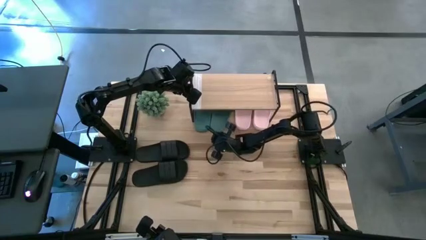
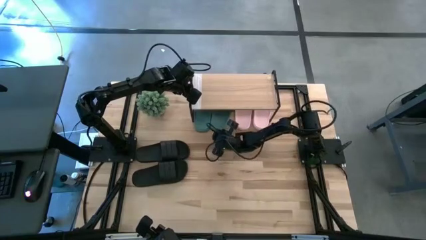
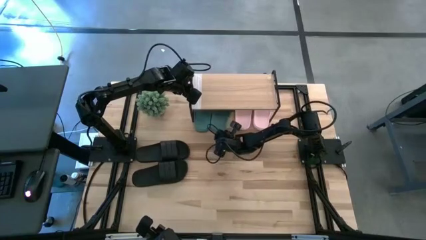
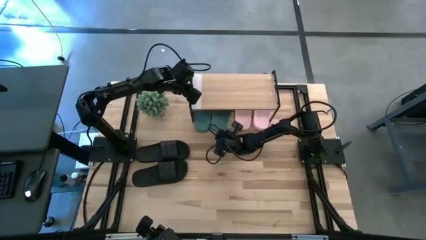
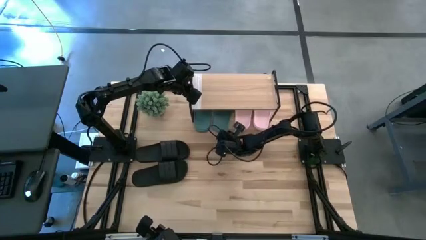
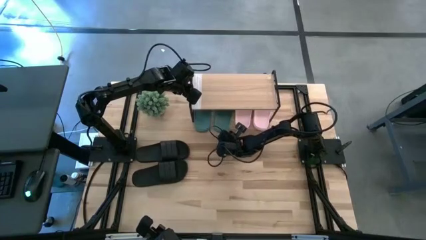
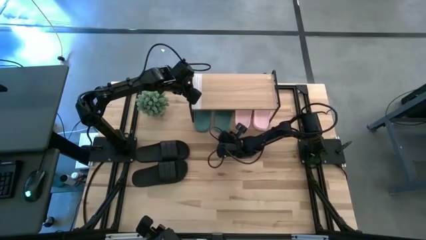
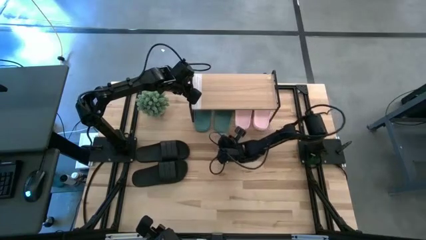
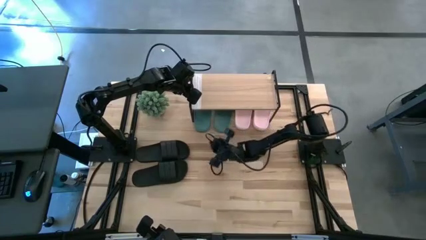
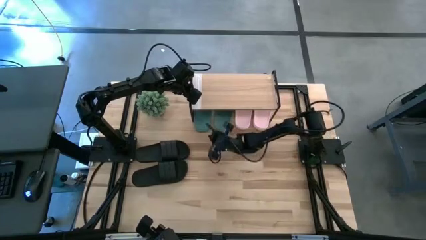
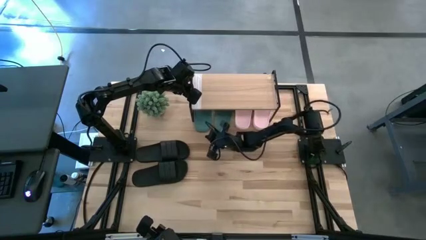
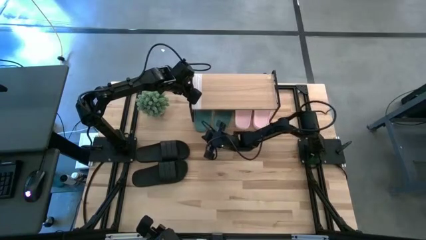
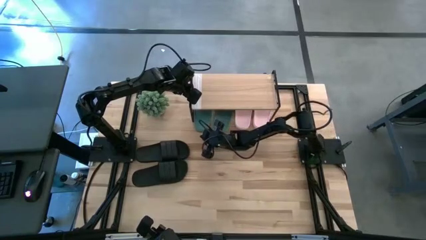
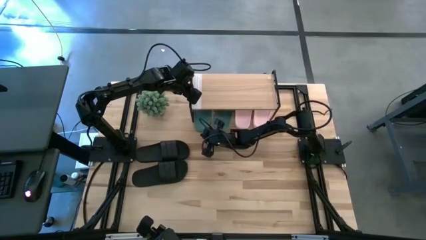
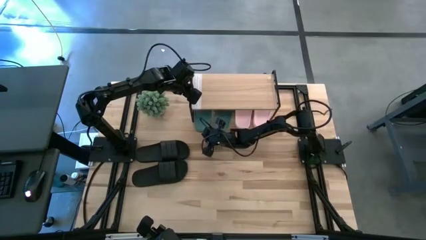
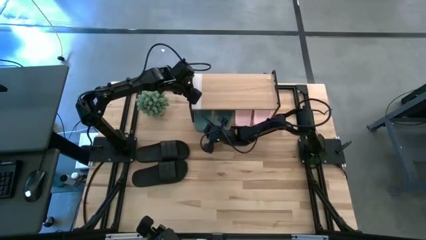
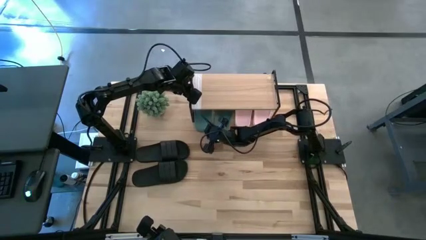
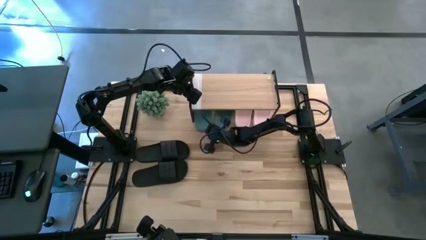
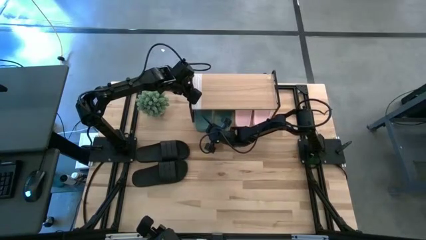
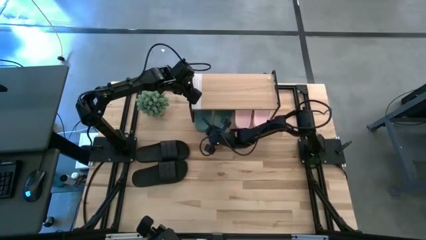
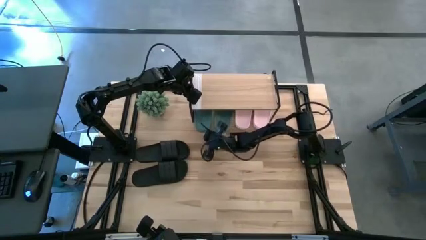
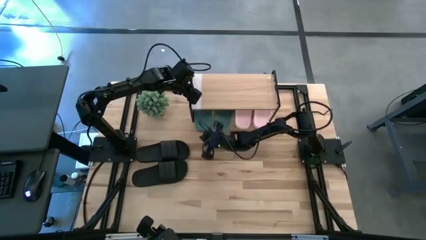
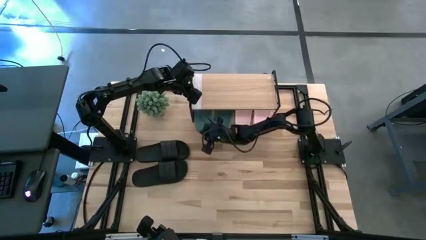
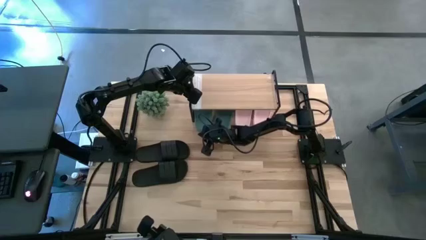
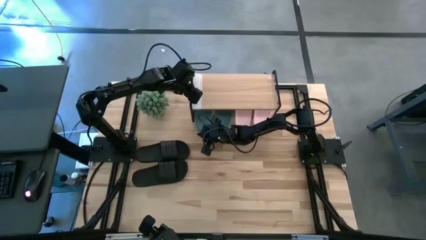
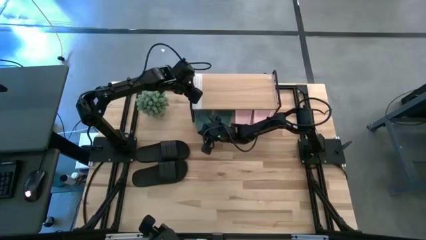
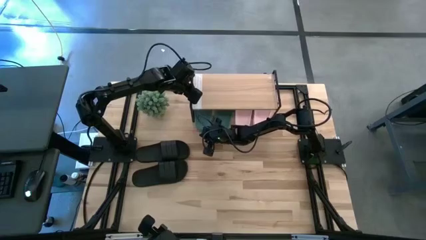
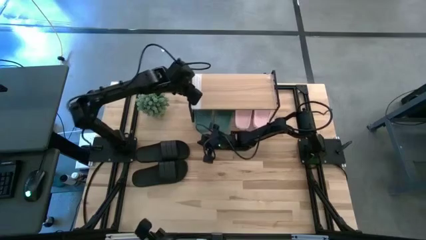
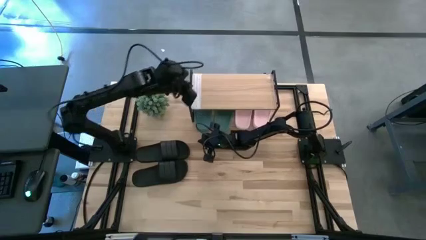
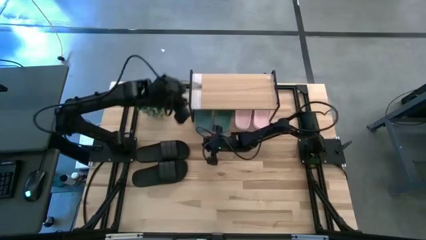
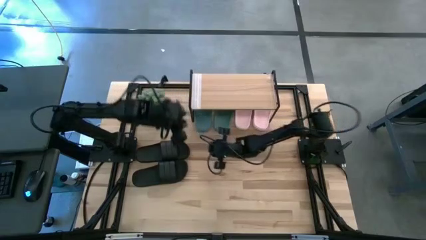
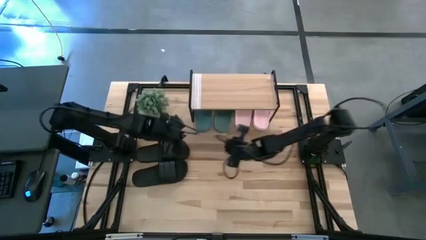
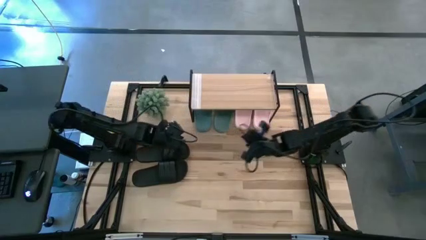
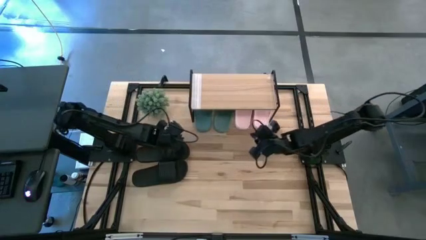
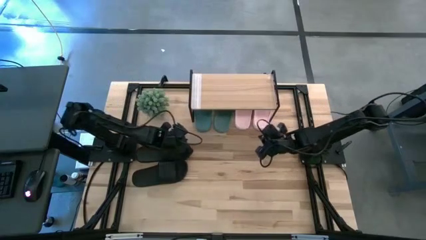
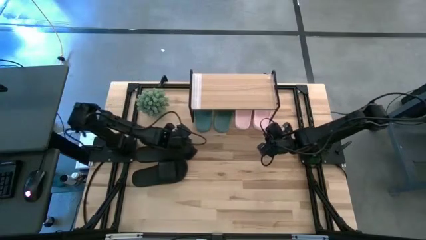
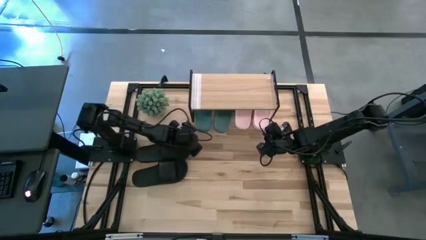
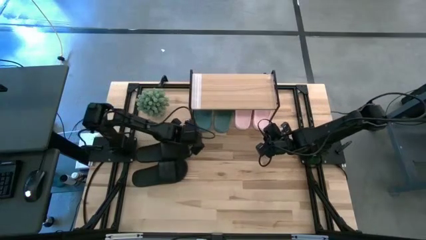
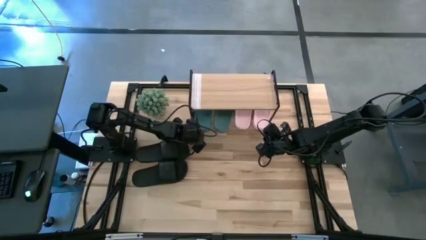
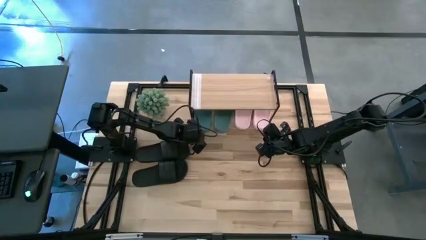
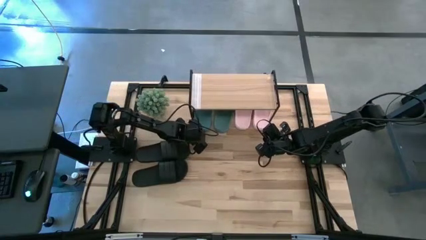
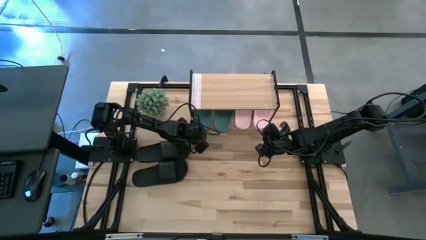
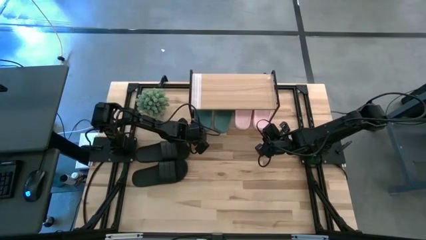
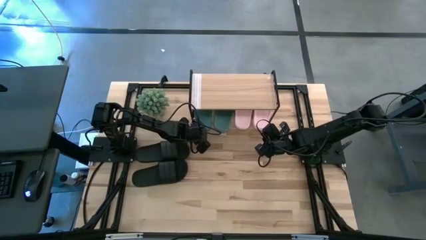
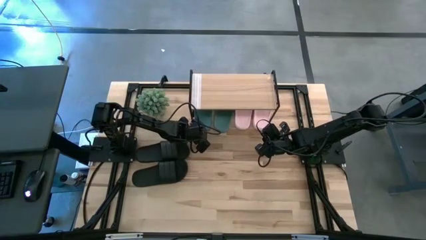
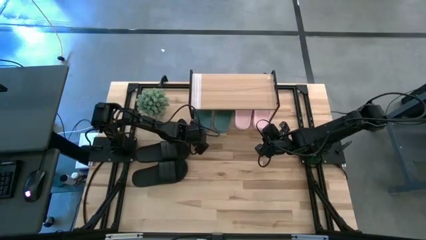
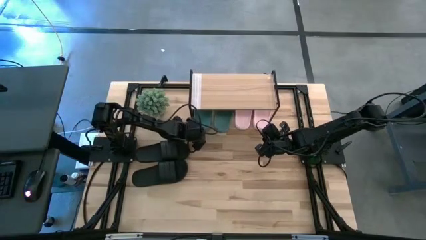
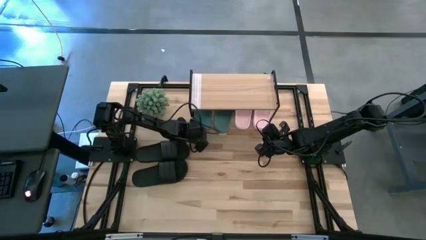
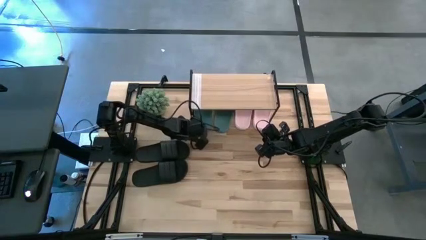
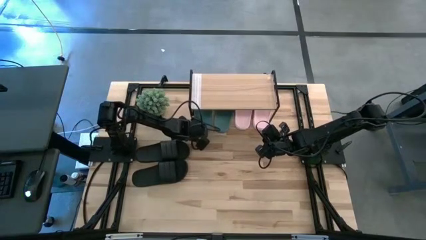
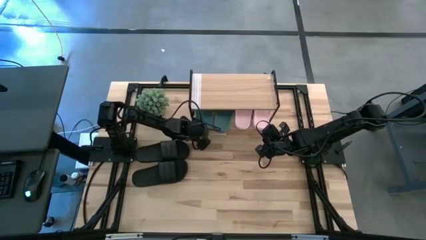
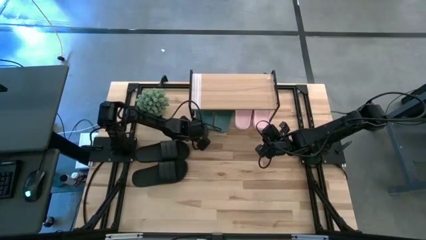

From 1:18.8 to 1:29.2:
Task: Pick and place slides into the shelf
Adjust the slides under the shelf

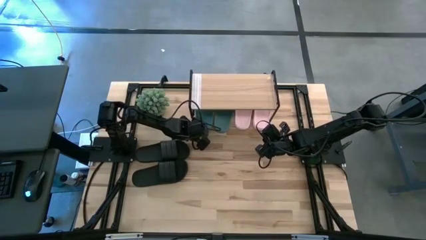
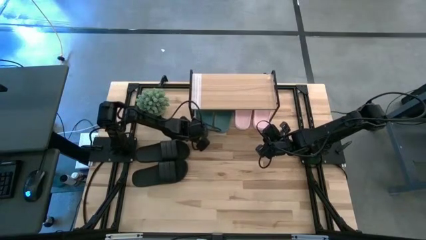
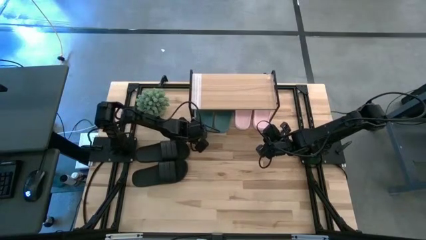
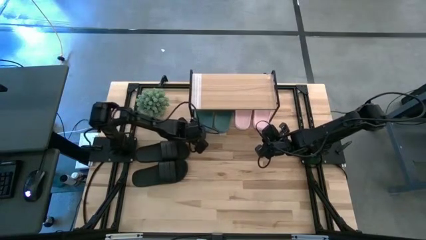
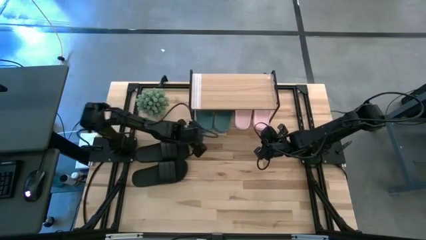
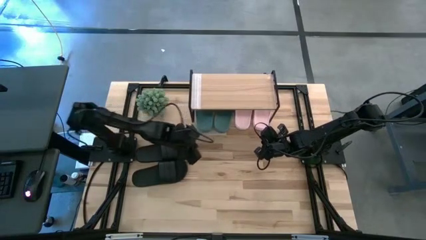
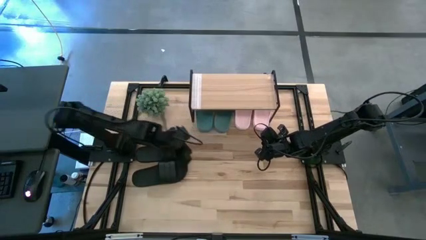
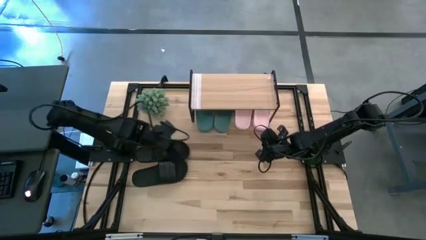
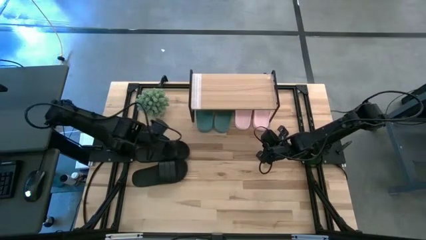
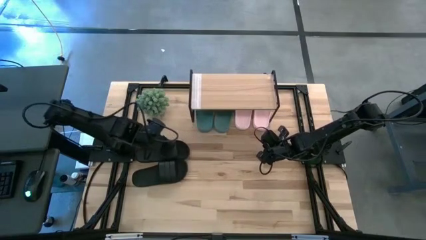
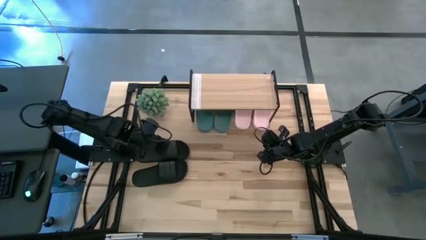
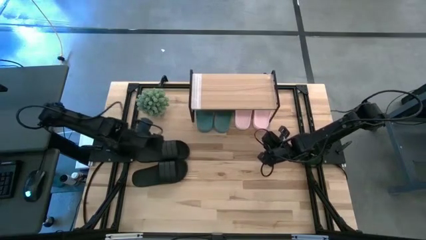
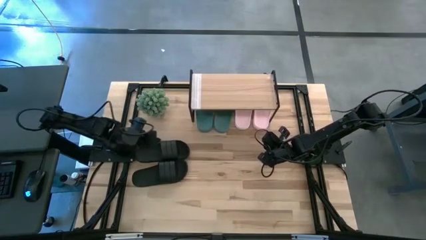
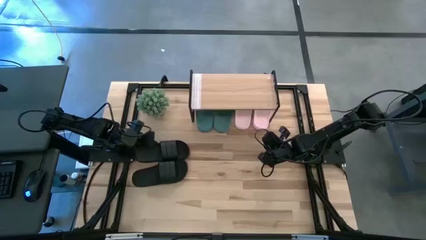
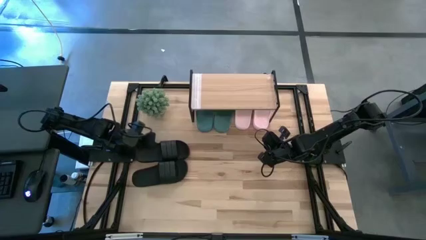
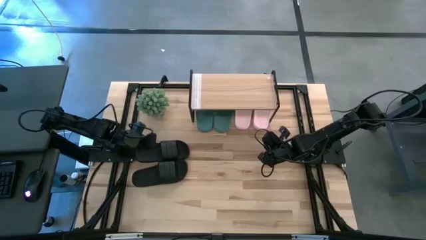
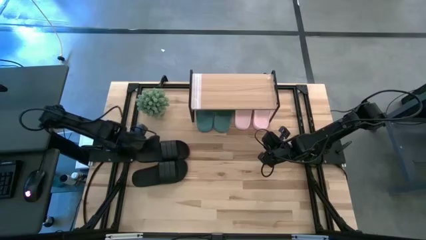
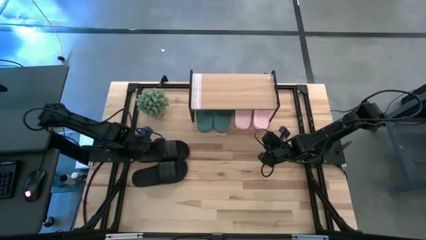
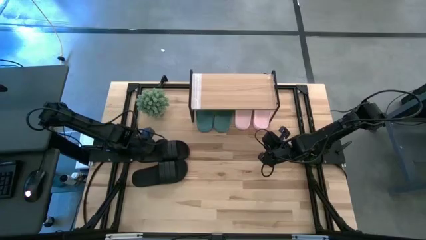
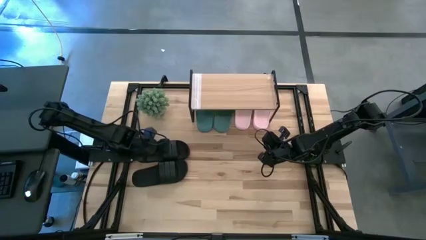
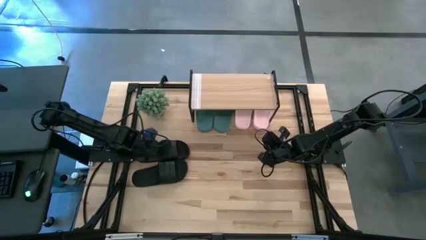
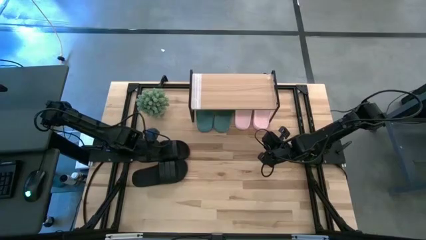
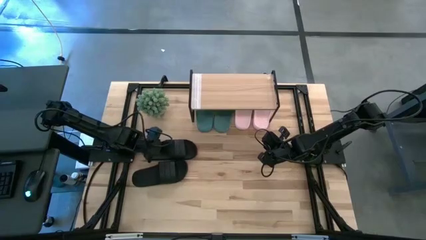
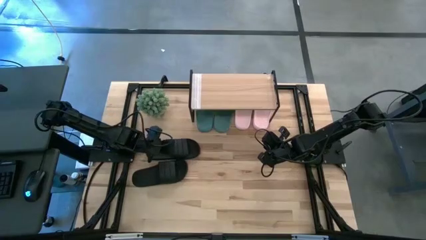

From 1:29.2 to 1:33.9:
Put the top black slides on the shelf

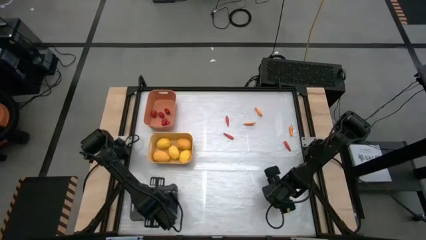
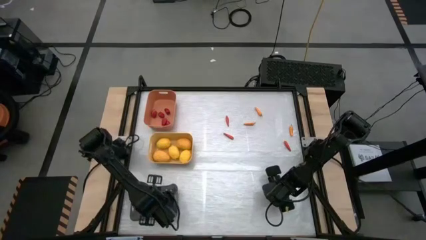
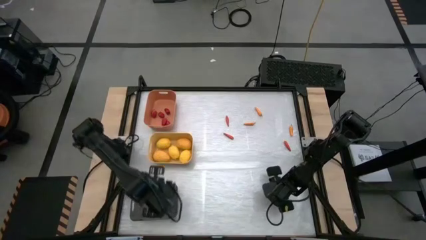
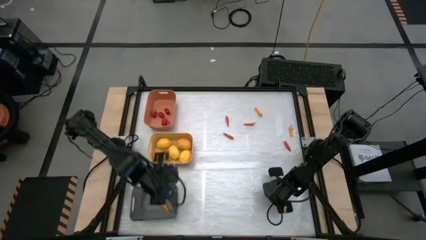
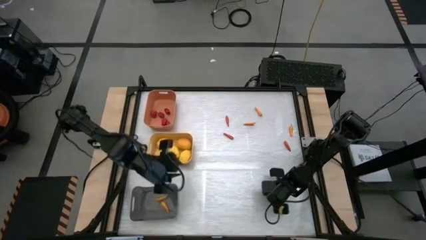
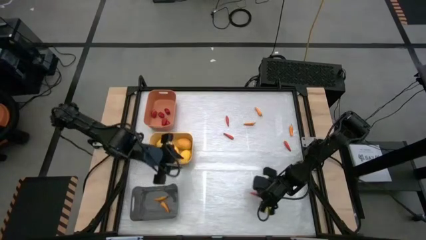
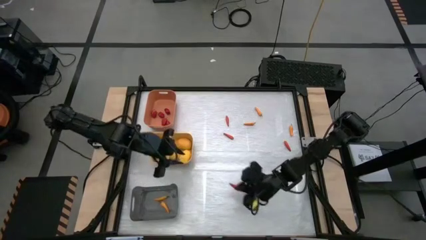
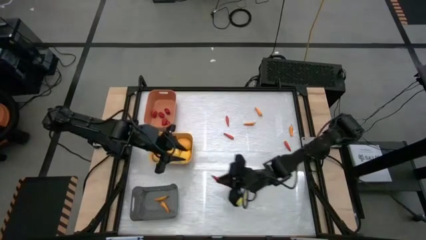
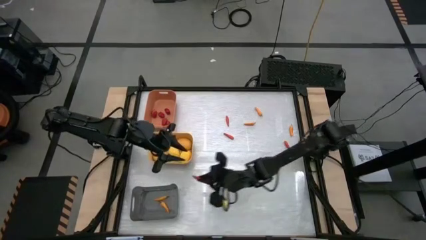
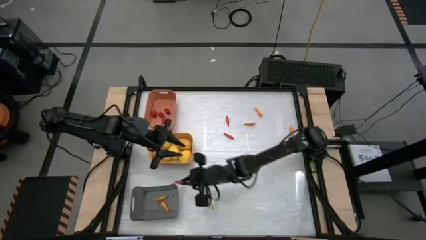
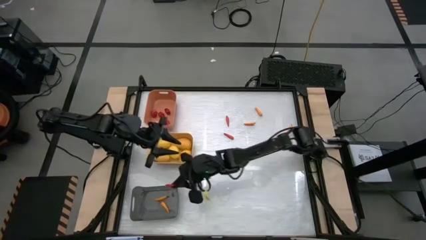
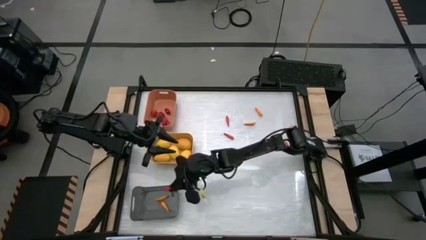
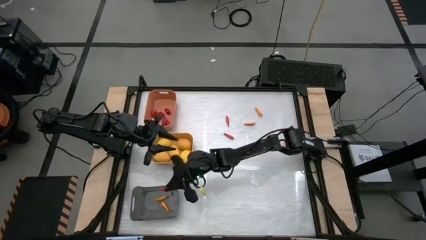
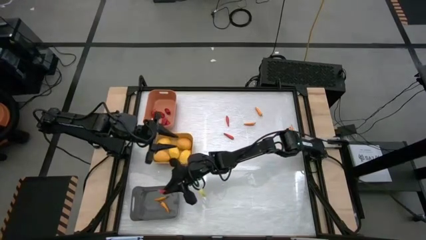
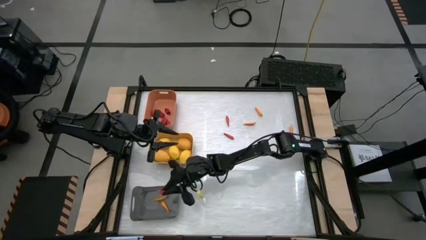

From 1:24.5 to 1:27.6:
Task: Sort produce into baskets
Put the red chili pepper into the gray bin
